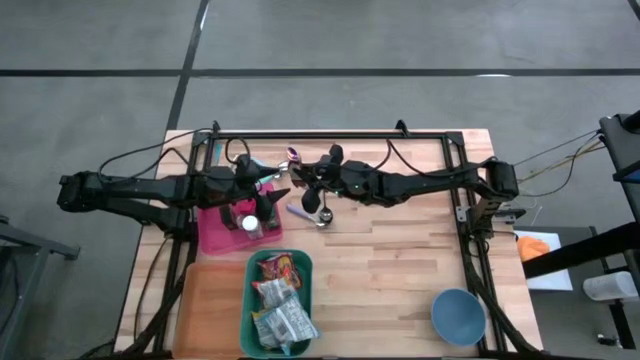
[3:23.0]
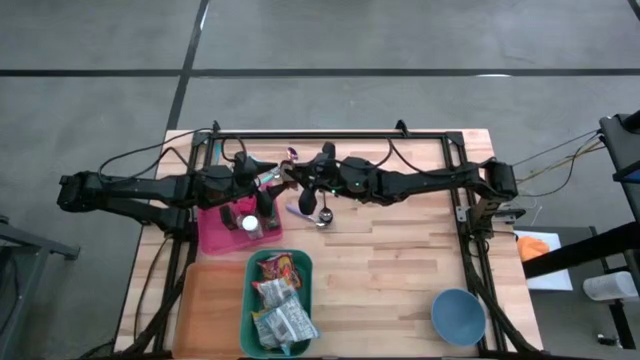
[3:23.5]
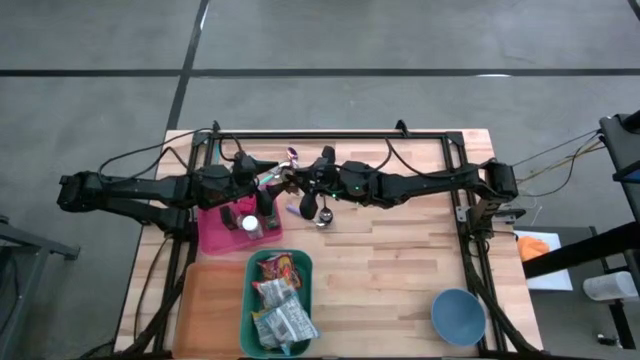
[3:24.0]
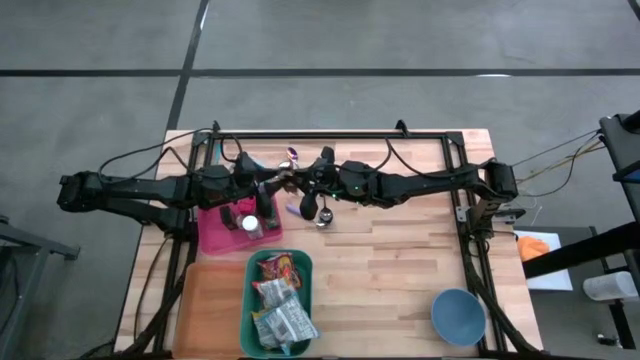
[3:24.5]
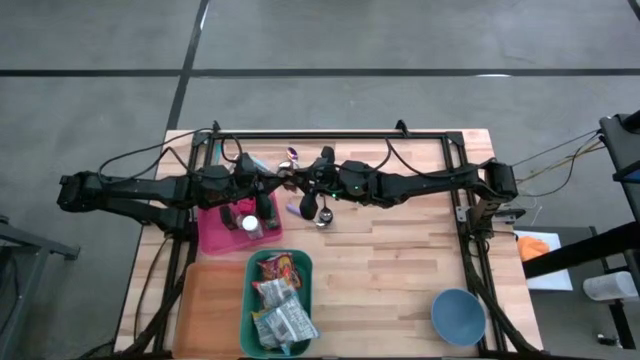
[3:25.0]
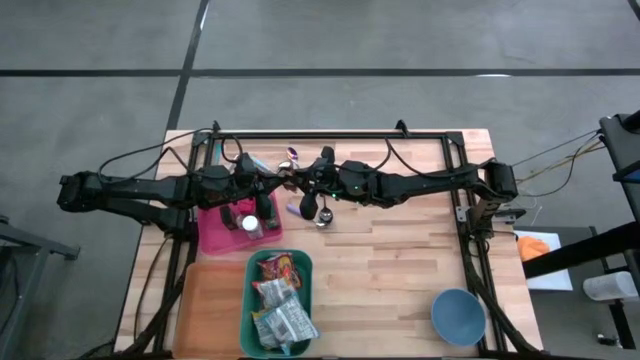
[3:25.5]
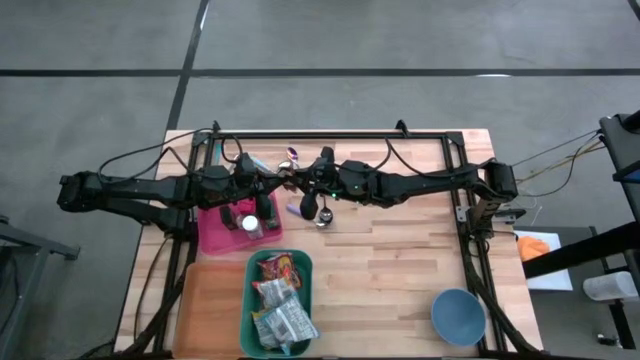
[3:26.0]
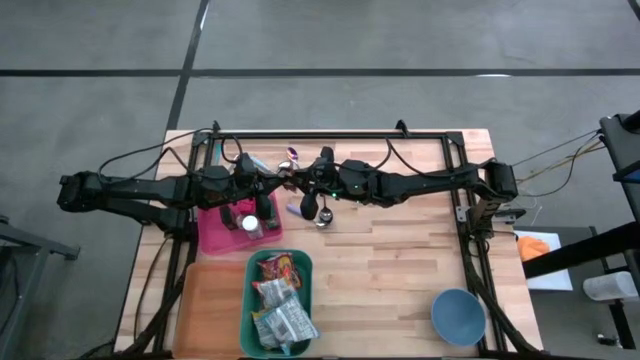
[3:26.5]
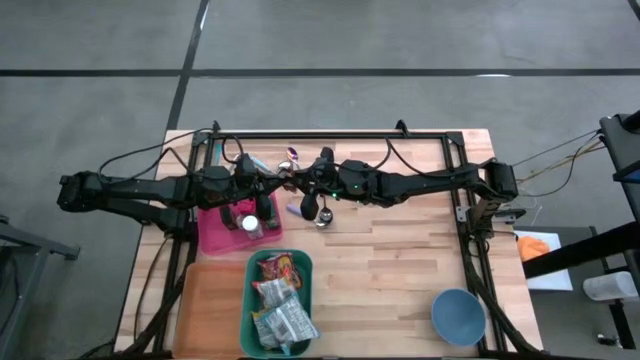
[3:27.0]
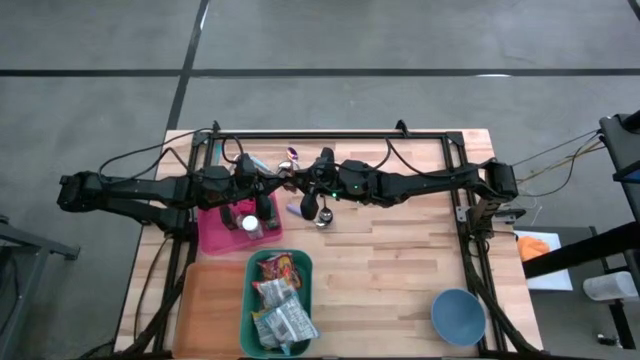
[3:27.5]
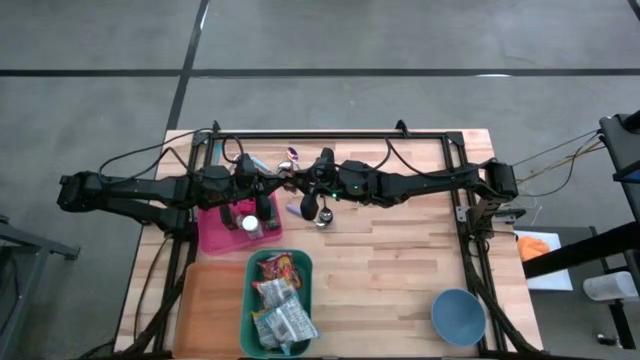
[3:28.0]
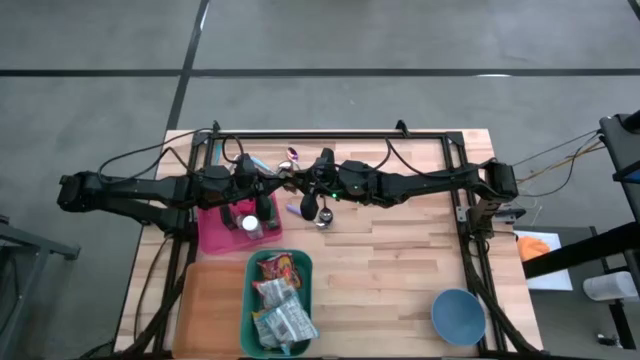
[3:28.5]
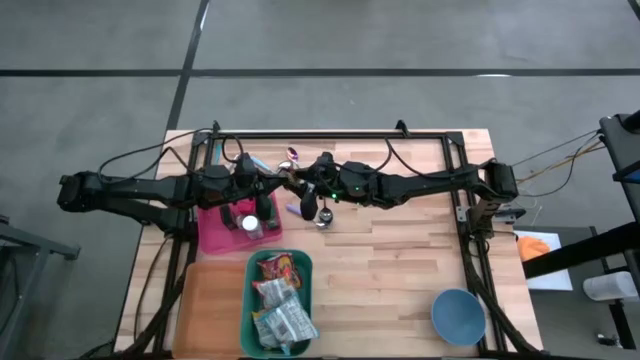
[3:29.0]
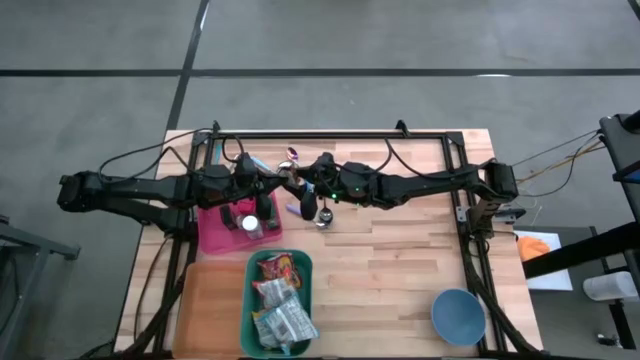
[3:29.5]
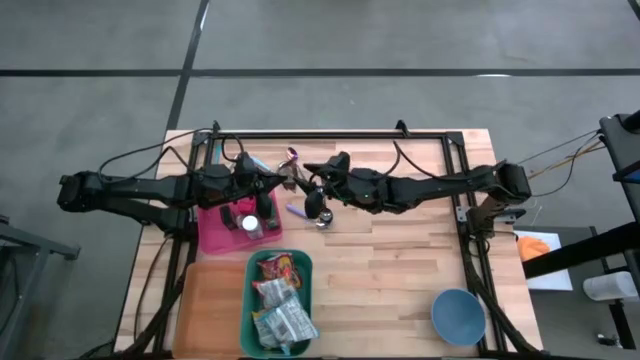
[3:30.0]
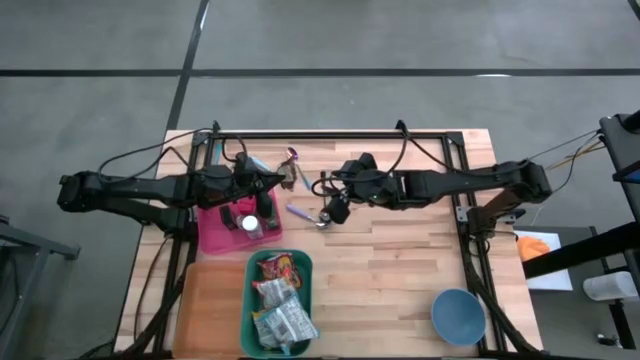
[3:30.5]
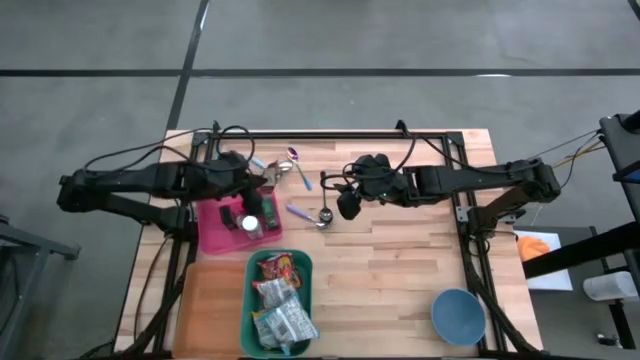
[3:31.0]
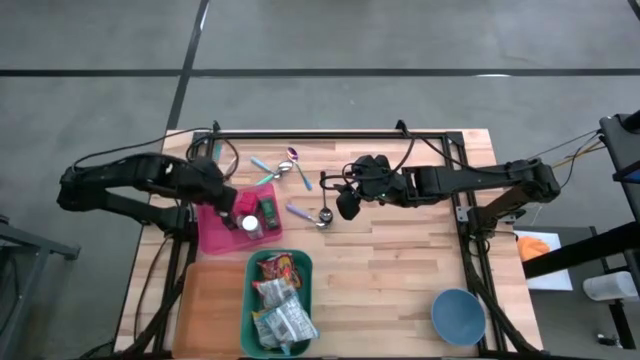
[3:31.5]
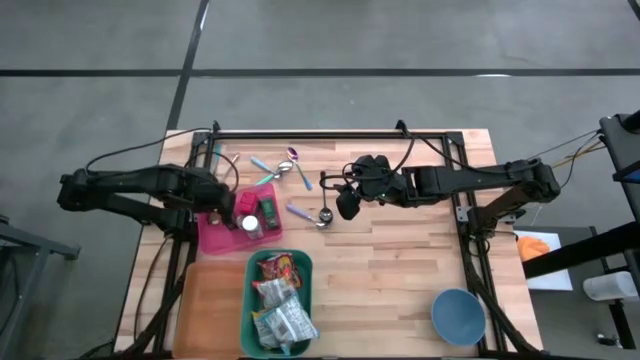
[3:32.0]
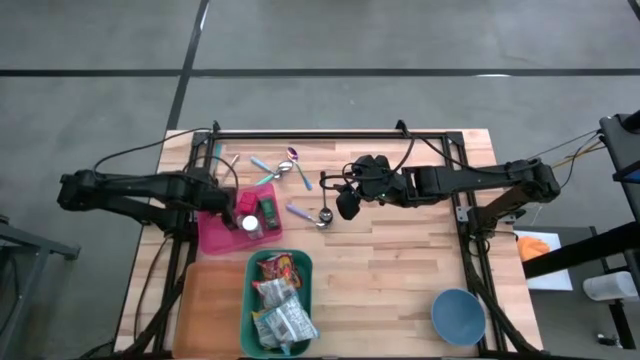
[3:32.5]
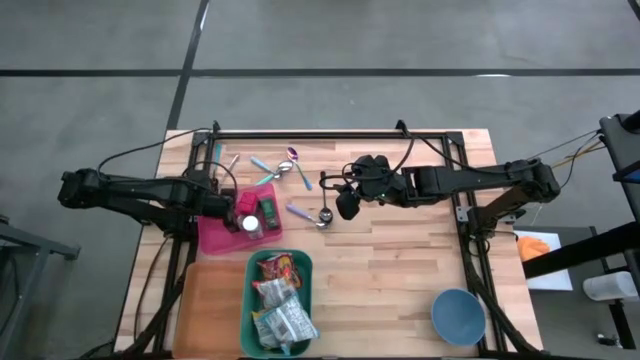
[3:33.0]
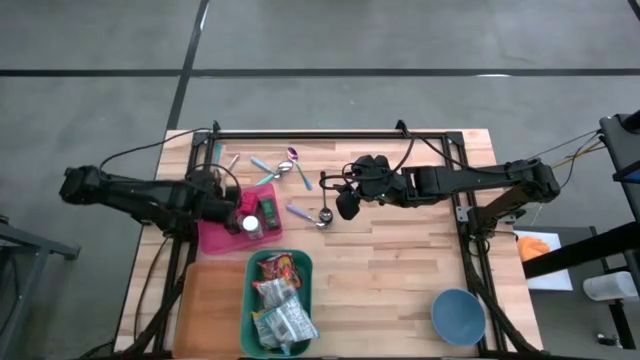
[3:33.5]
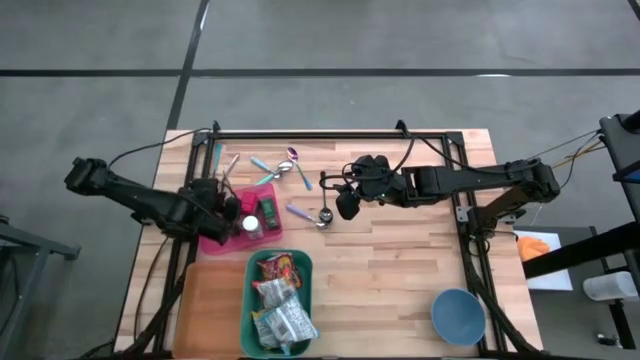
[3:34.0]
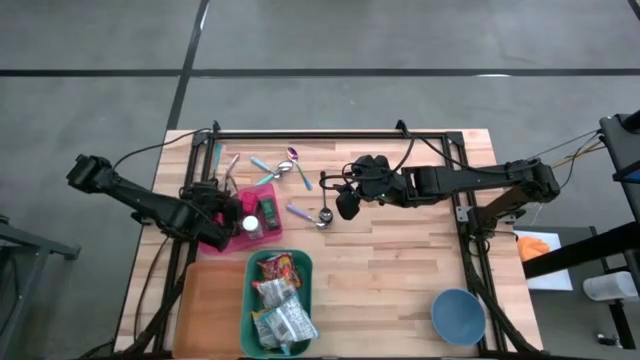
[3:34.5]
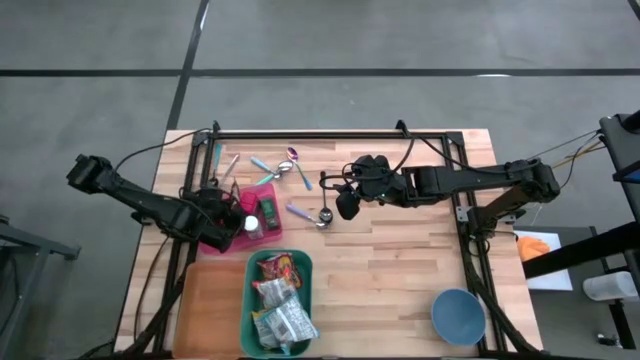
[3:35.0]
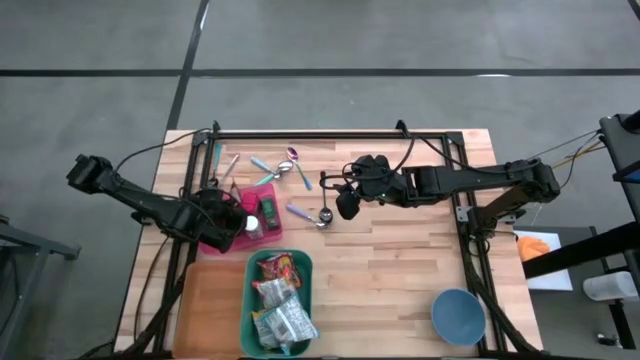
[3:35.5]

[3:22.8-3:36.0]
Put the orange seasoning pack into the pink bin
